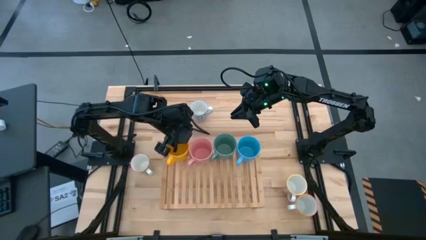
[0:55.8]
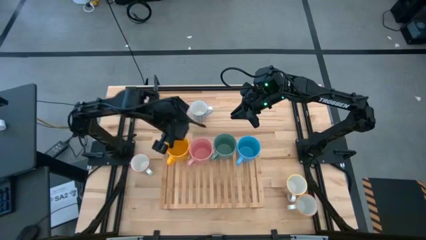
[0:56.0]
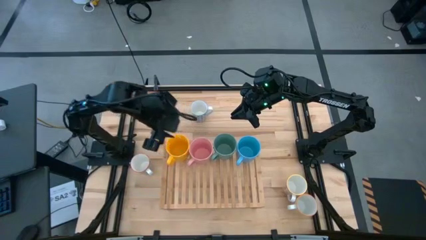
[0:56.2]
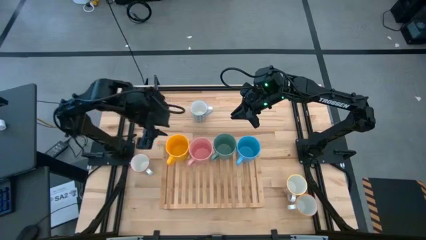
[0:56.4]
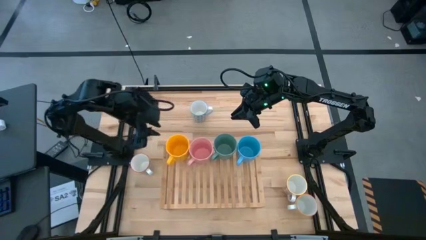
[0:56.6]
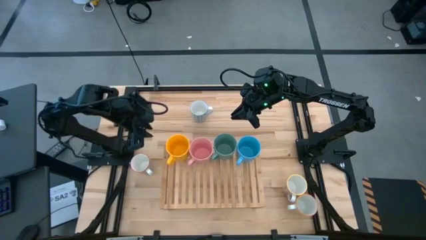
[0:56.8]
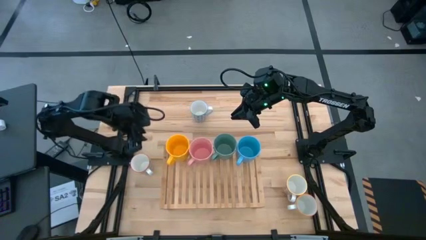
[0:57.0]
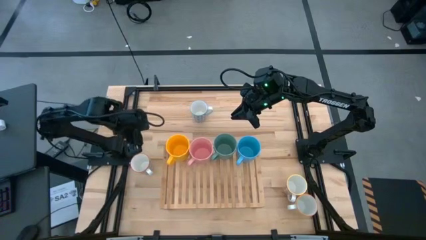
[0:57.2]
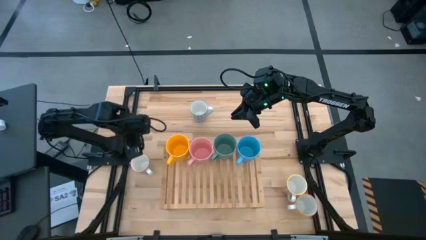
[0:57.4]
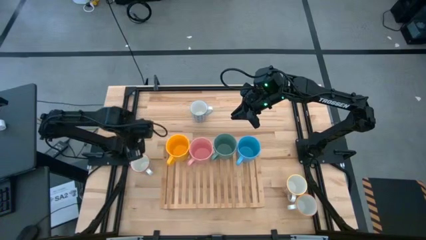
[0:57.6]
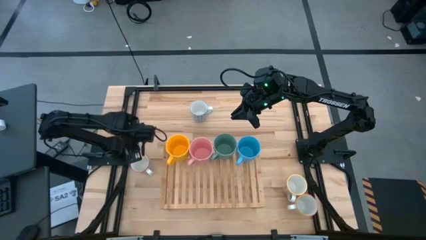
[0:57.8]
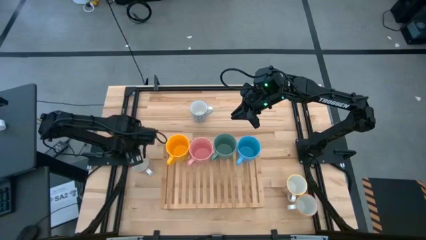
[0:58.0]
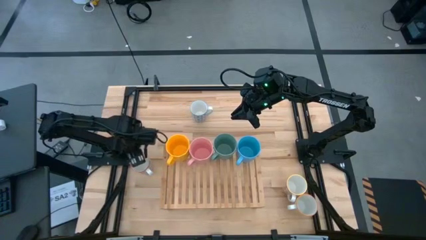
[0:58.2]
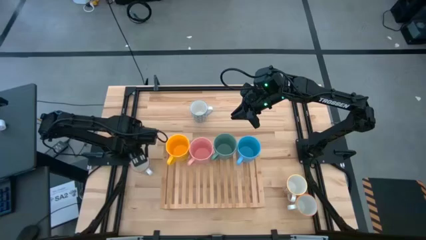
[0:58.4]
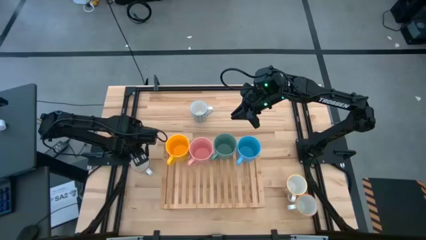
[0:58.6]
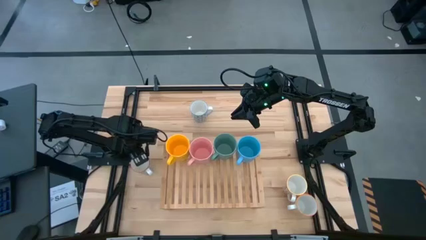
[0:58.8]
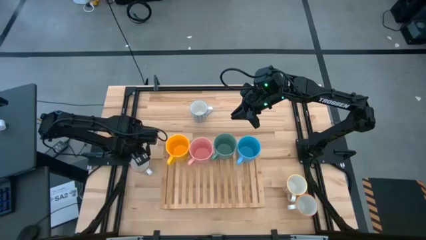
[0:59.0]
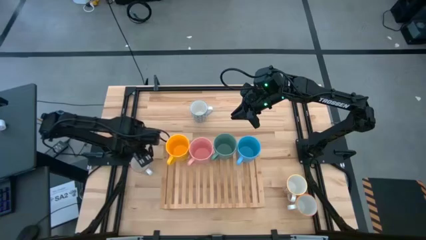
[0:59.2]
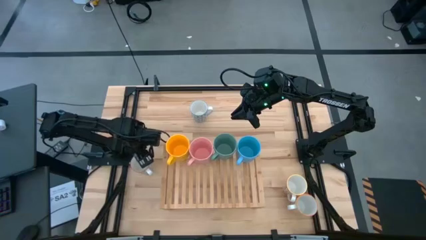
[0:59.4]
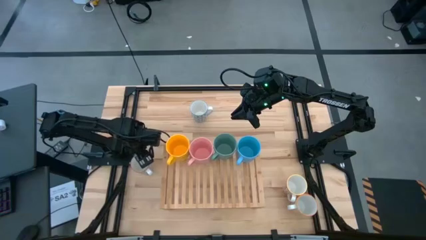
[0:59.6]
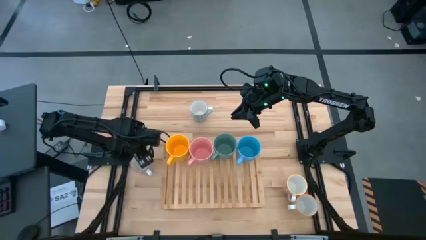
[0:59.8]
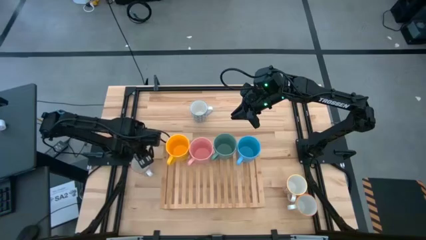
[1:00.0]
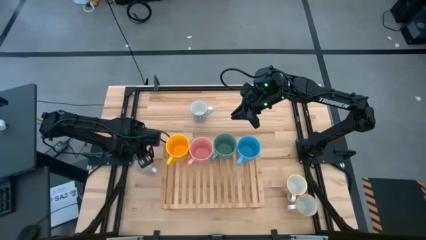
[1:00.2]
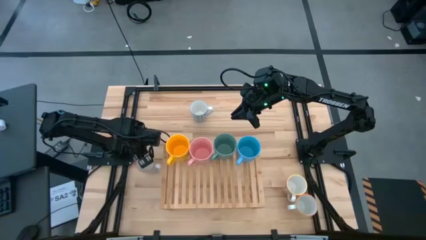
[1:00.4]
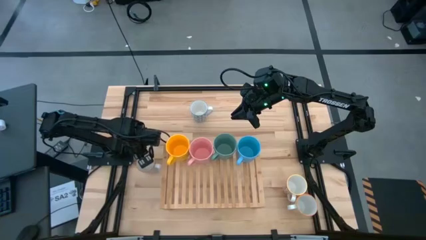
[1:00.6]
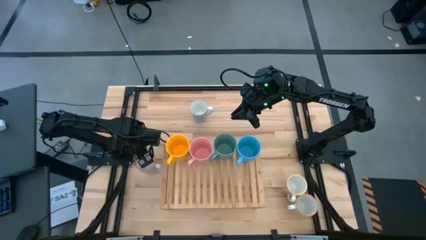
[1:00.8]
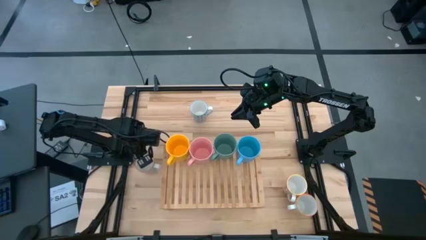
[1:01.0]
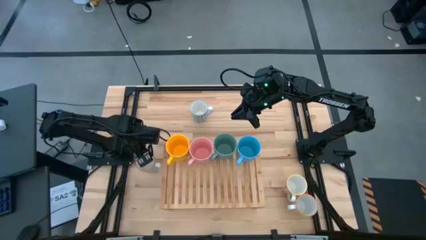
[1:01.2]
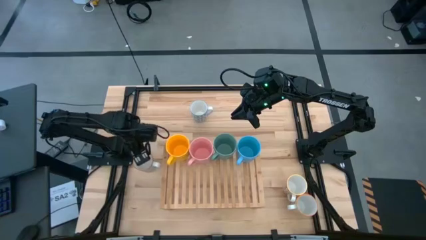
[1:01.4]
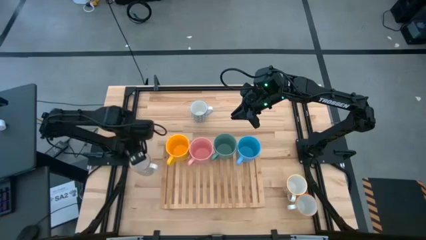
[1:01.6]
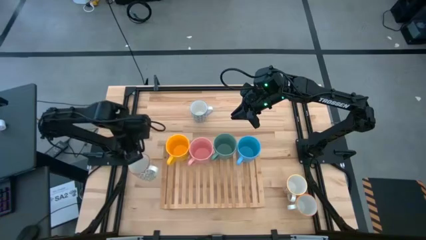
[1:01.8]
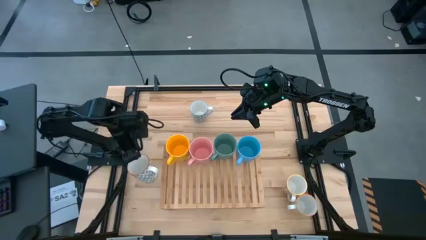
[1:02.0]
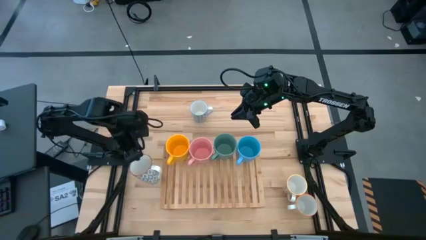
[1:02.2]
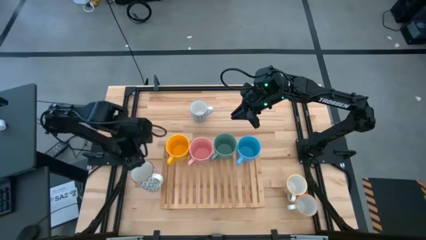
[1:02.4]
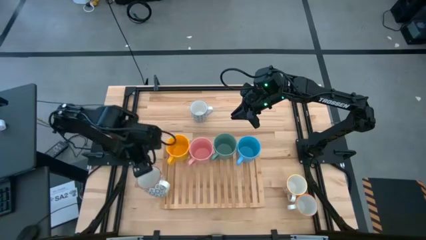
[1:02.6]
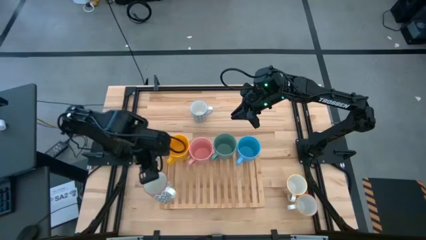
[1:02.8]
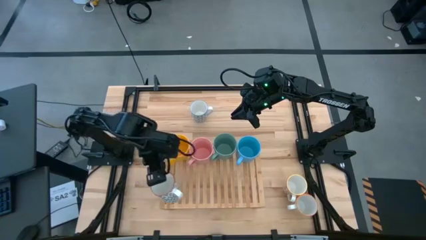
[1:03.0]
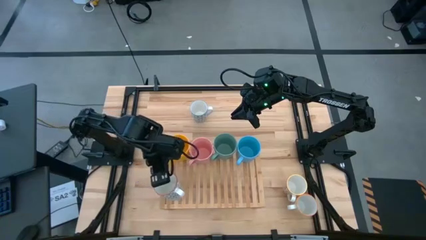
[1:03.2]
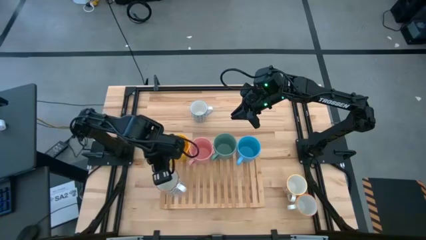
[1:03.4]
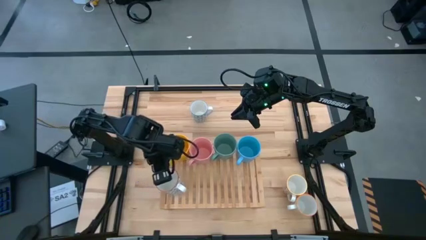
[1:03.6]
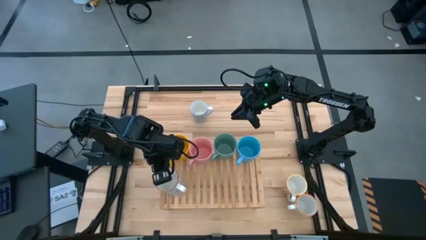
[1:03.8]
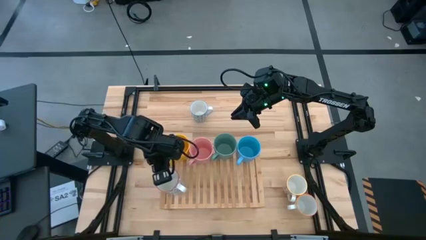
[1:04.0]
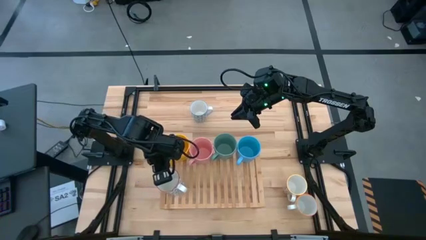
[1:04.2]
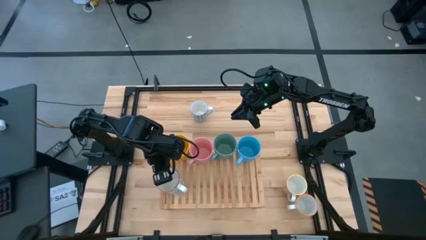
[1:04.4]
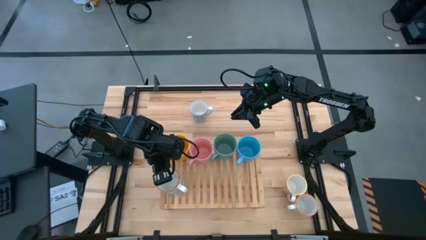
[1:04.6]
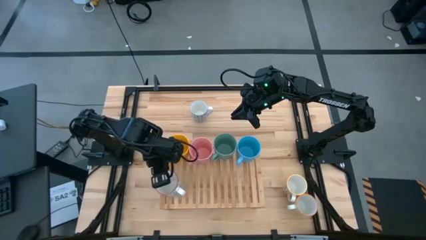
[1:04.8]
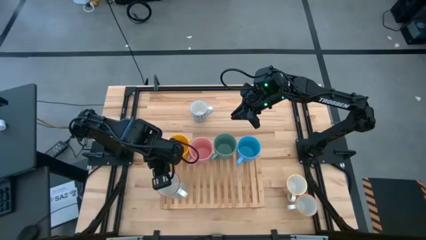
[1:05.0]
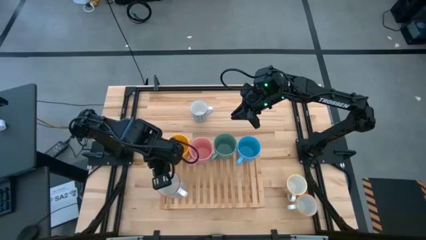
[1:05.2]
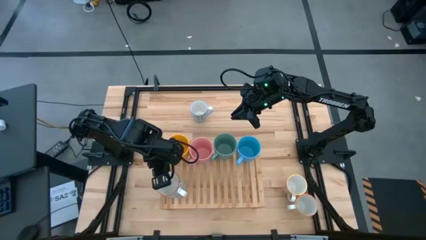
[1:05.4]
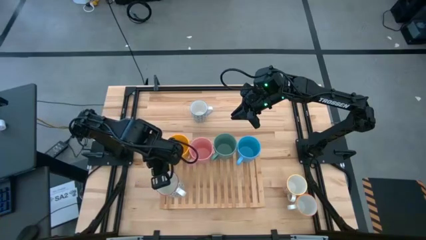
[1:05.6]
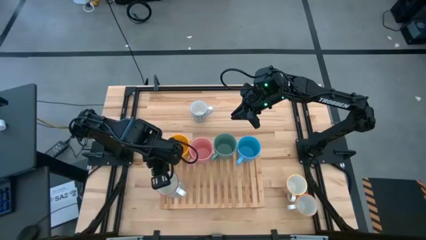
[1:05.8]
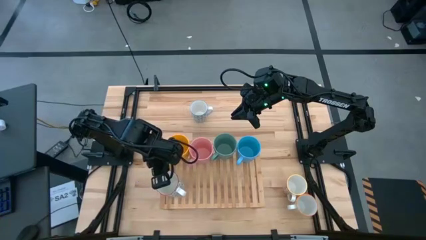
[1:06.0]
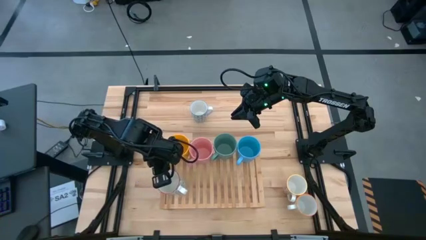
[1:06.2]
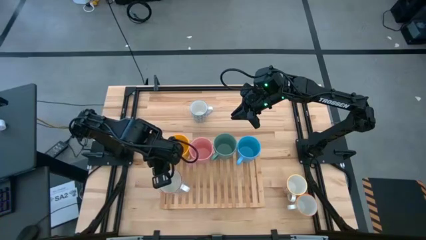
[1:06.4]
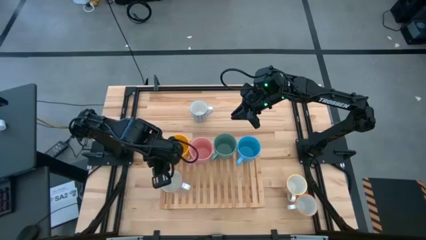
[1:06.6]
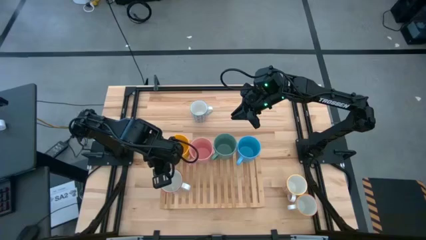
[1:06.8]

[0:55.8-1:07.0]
Task: Place coffee mugs
Put the gray patterned mug on the shelf
